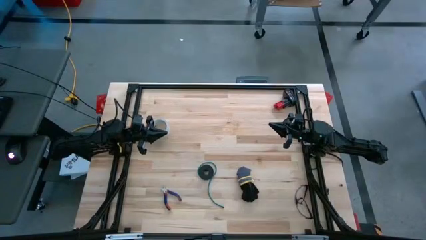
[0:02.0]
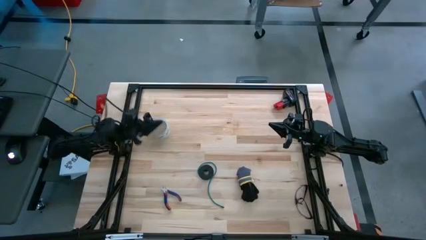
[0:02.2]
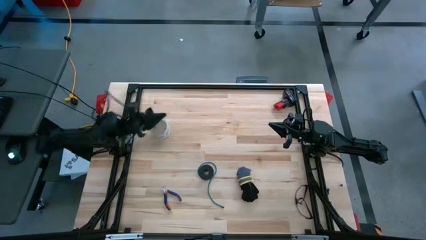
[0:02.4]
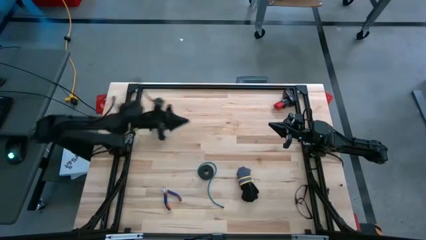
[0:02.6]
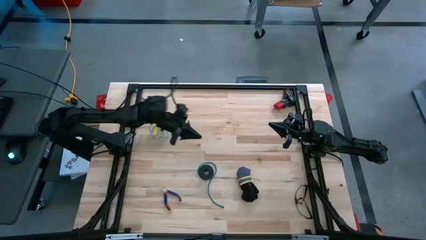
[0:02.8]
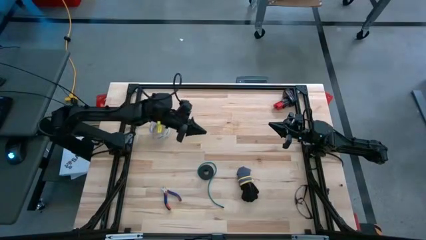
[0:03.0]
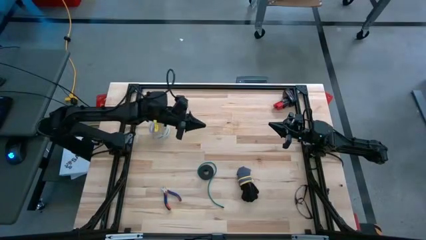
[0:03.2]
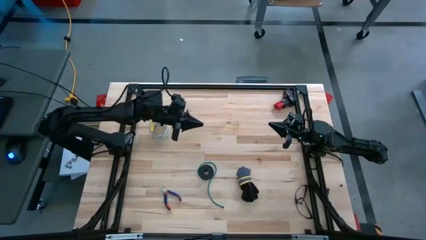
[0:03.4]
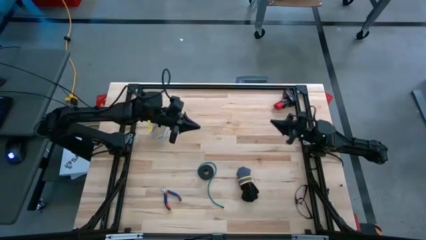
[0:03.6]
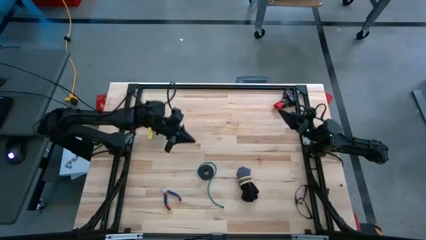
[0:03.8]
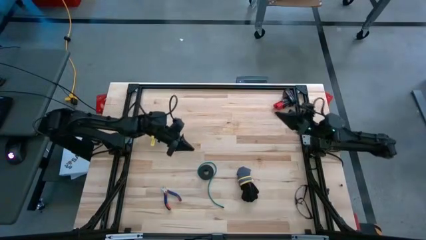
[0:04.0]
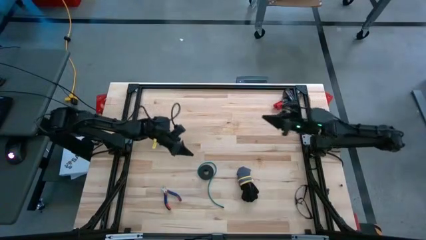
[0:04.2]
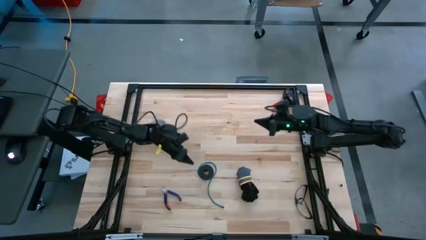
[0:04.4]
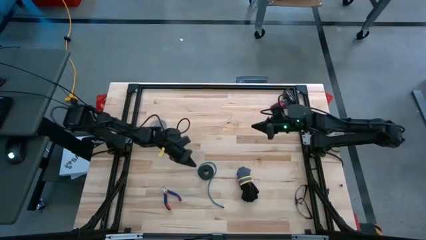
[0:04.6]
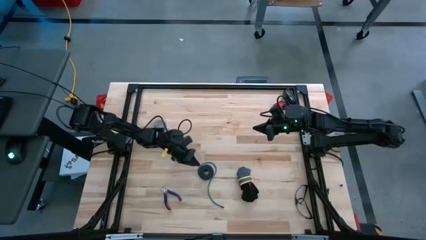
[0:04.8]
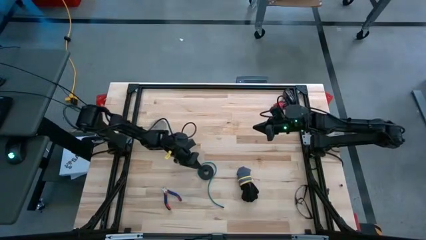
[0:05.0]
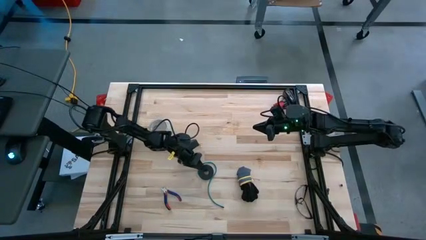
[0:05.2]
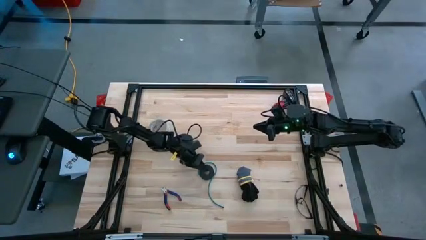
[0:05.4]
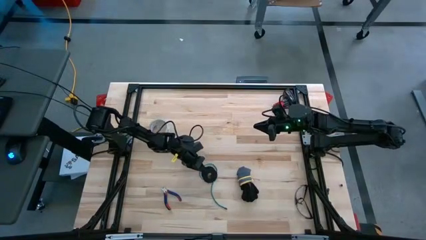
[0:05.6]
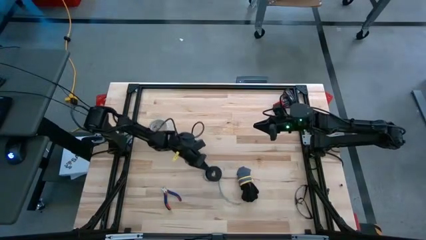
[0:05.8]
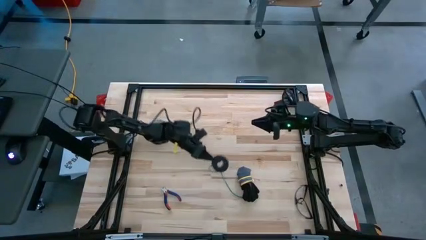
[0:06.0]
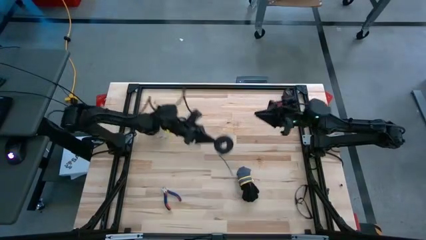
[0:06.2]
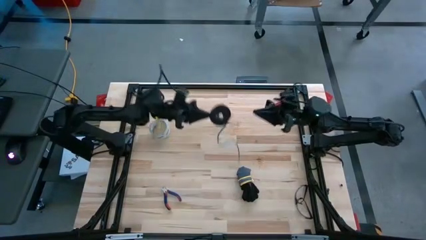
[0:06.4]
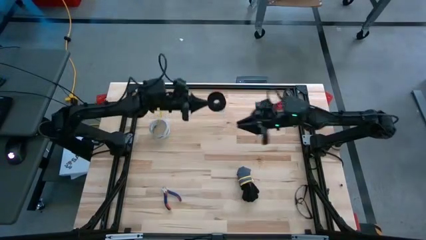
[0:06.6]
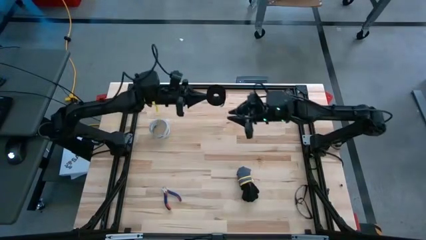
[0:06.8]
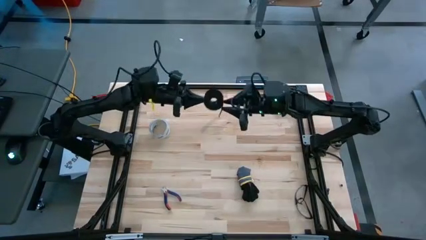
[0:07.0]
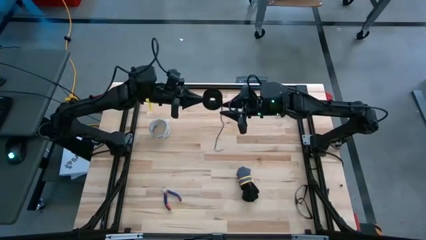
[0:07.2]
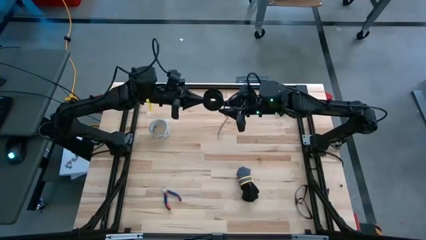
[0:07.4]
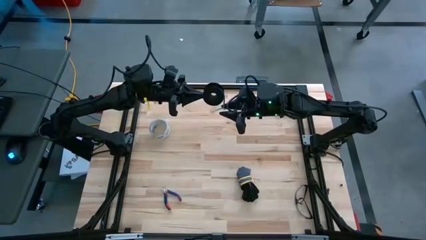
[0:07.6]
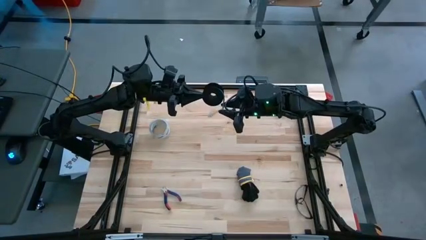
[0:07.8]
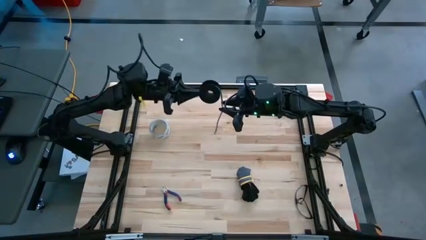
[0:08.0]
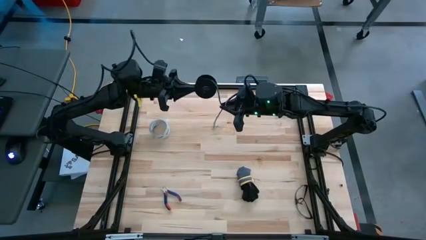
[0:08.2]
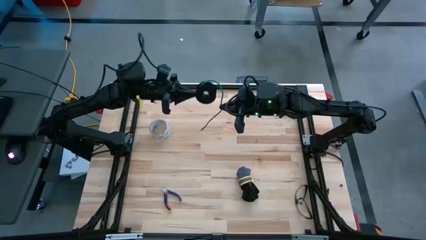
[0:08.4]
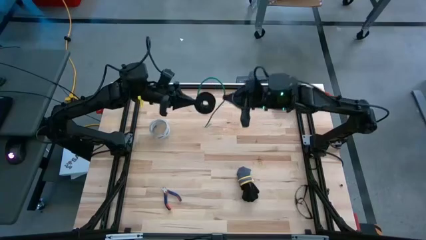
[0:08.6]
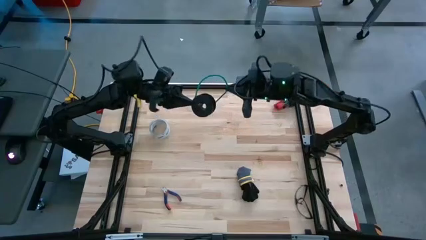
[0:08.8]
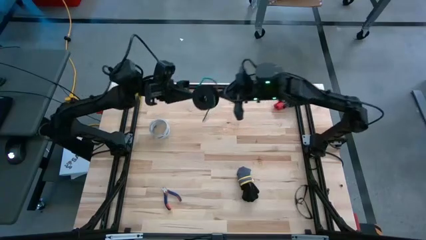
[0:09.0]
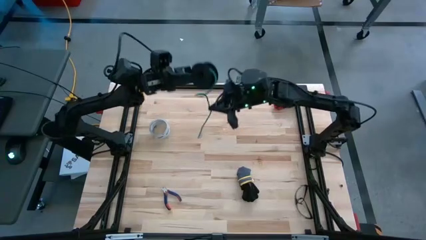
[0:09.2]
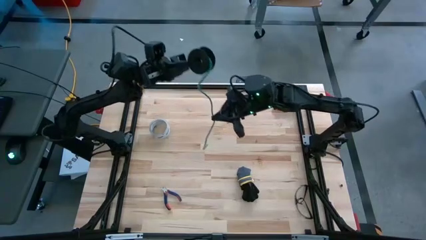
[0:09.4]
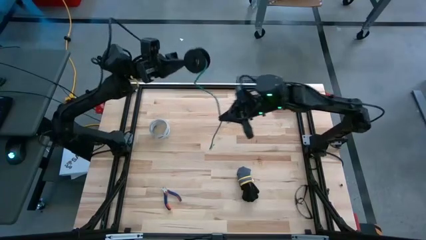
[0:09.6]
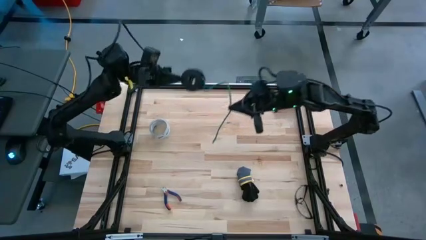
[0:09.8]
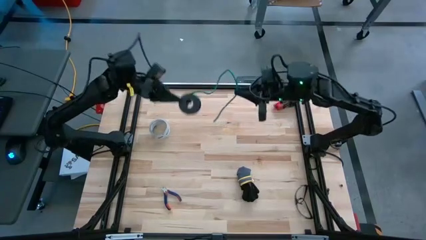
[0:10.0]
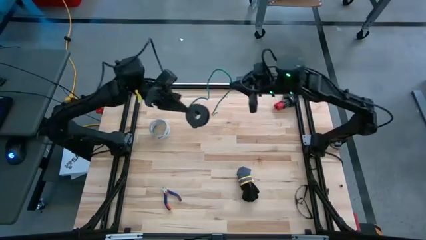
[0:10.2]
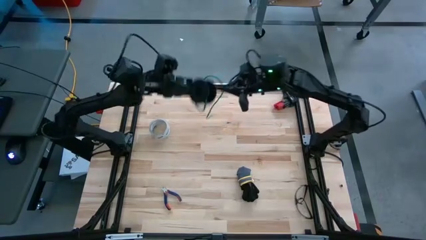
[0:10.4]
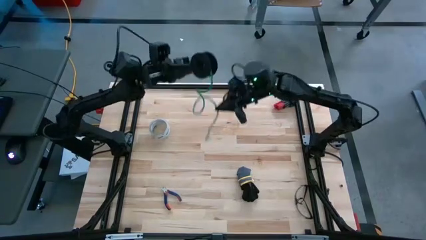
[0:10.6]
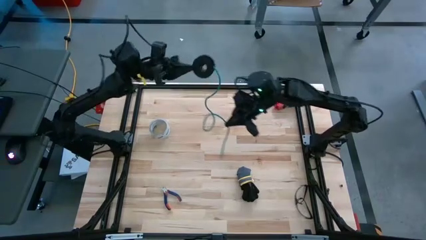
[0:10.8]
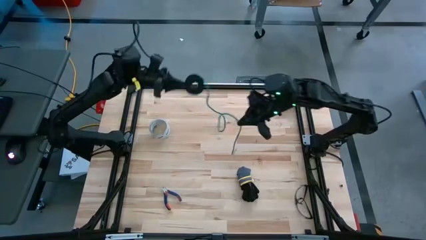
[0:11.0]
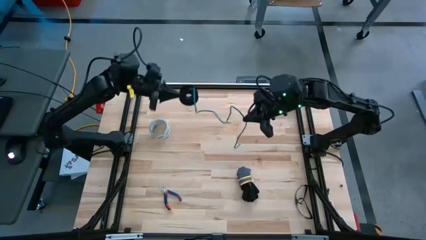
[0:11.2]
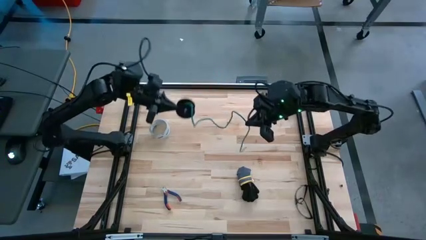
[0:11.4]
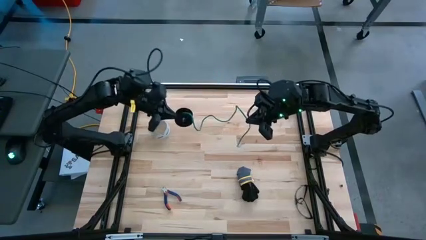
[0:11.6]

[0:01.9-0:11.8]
Task: Coil cords
Uncoil the green wire from the cable spool
